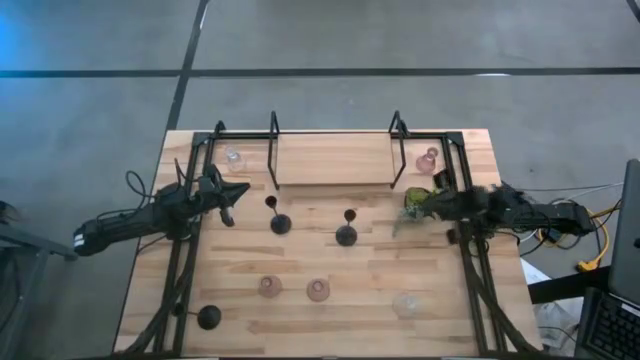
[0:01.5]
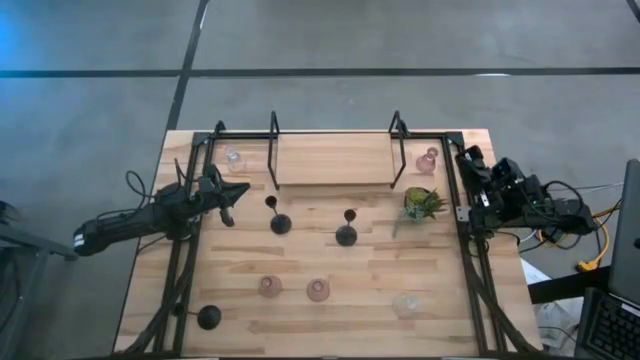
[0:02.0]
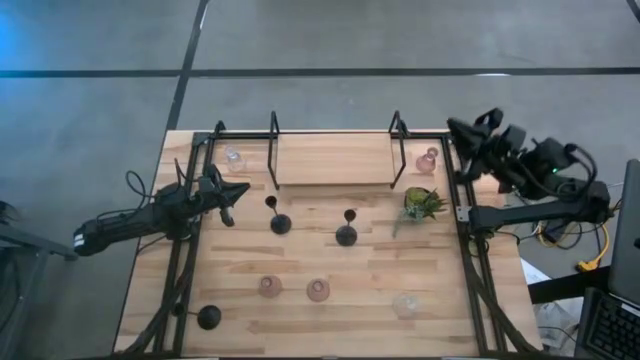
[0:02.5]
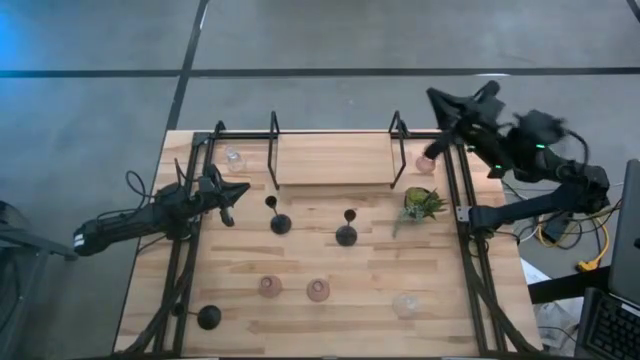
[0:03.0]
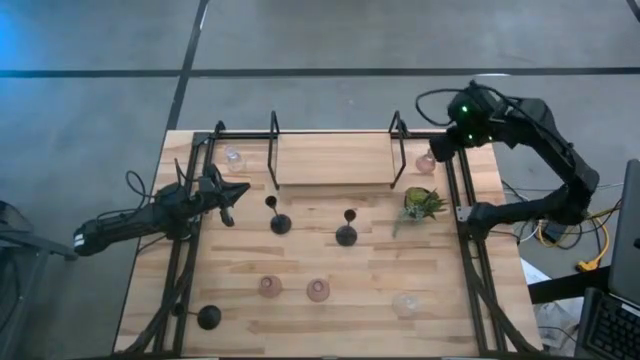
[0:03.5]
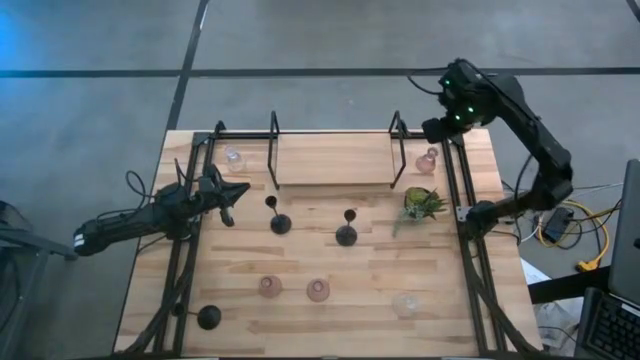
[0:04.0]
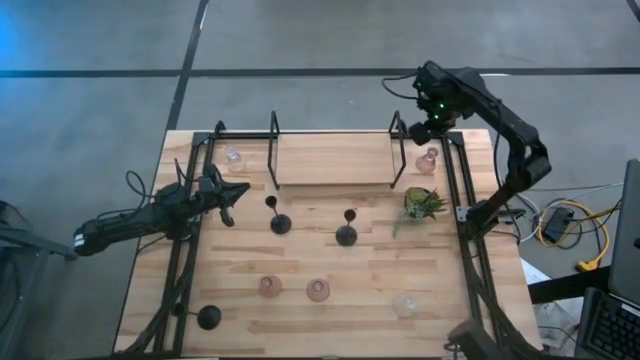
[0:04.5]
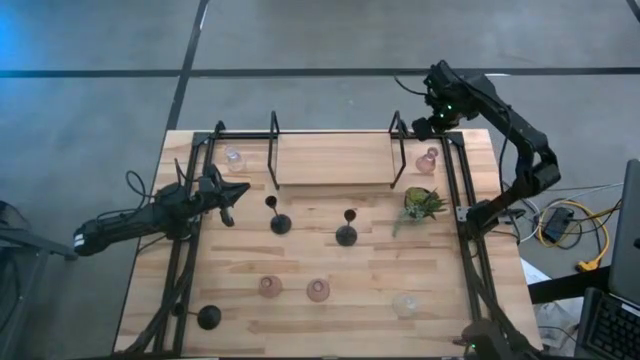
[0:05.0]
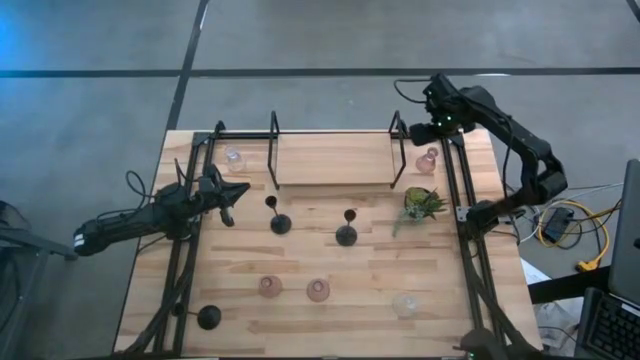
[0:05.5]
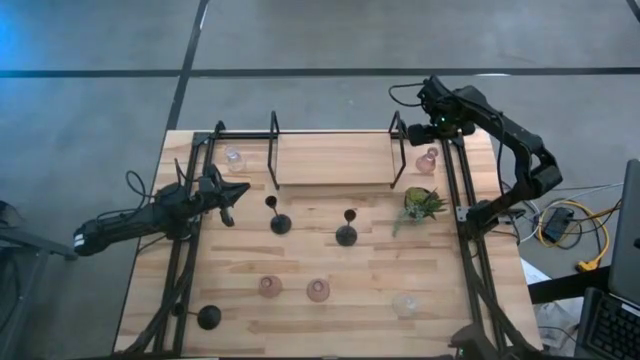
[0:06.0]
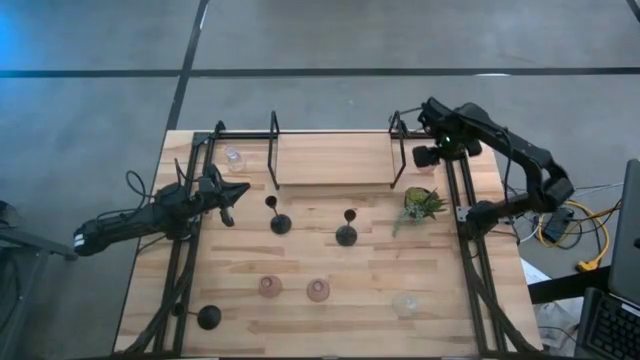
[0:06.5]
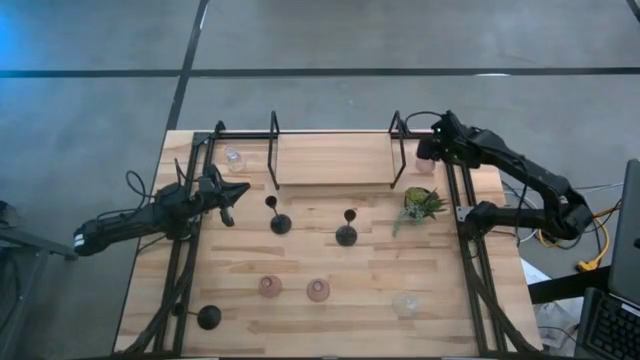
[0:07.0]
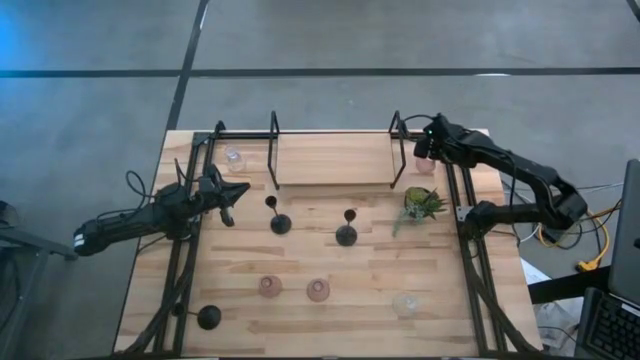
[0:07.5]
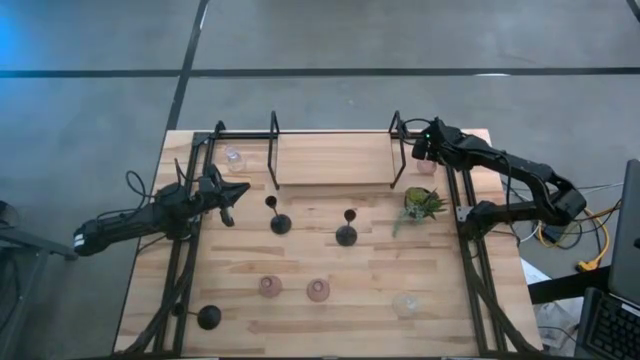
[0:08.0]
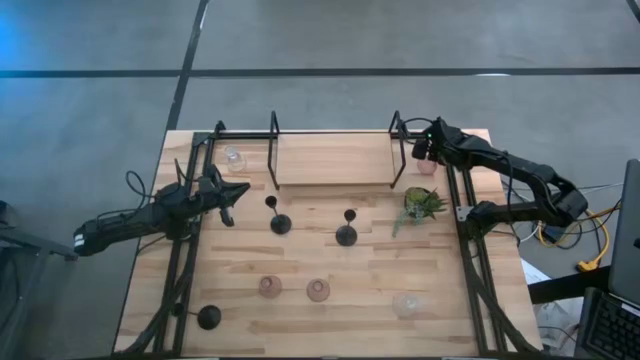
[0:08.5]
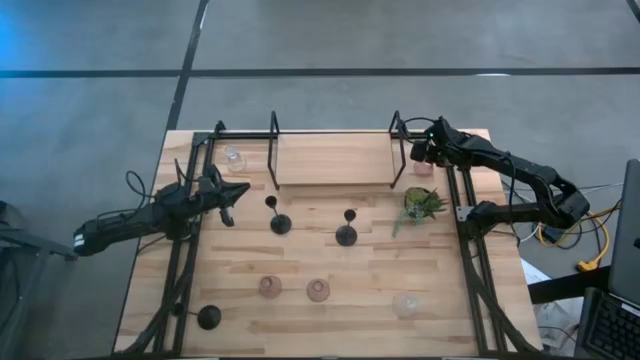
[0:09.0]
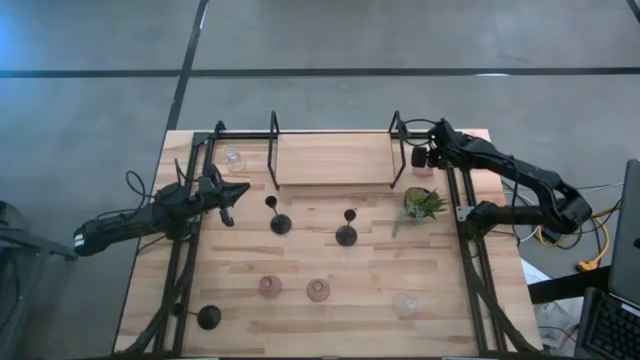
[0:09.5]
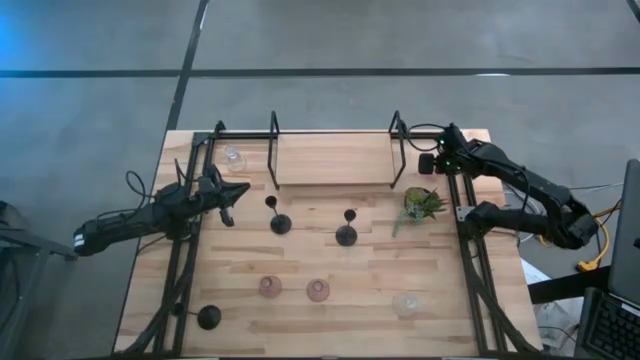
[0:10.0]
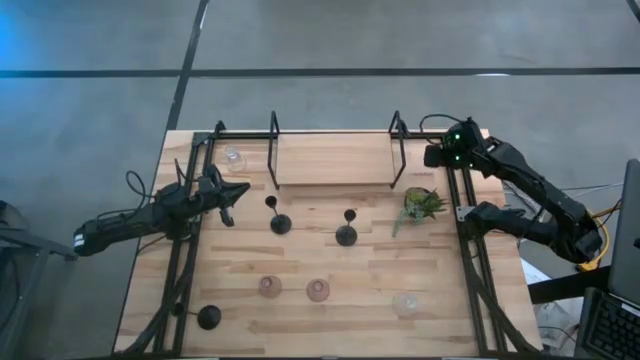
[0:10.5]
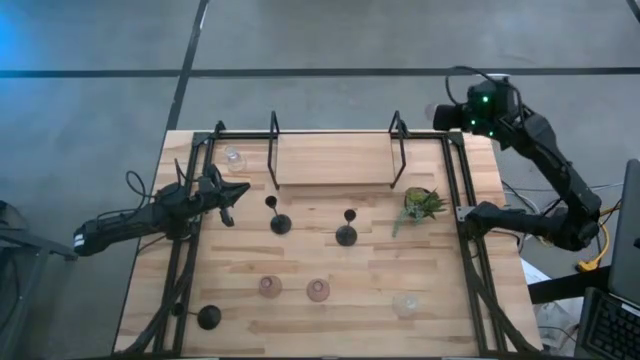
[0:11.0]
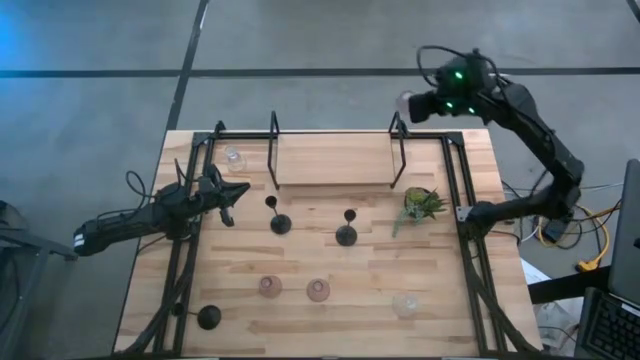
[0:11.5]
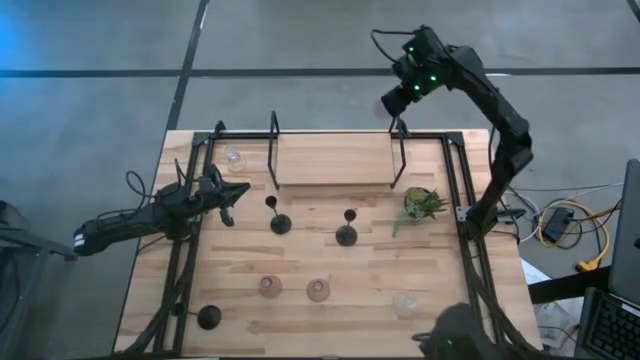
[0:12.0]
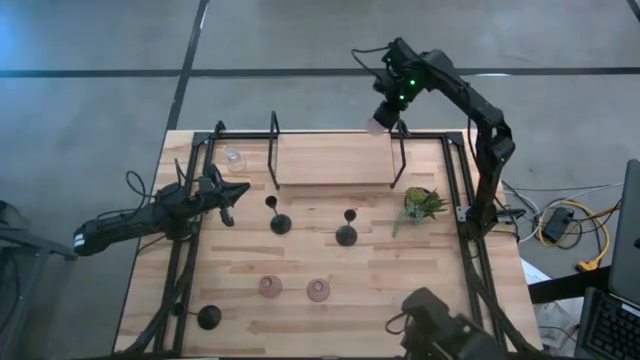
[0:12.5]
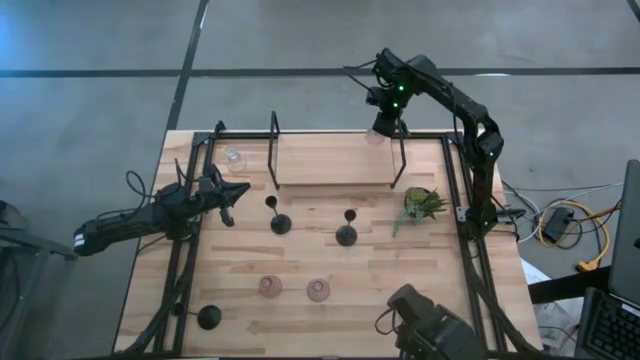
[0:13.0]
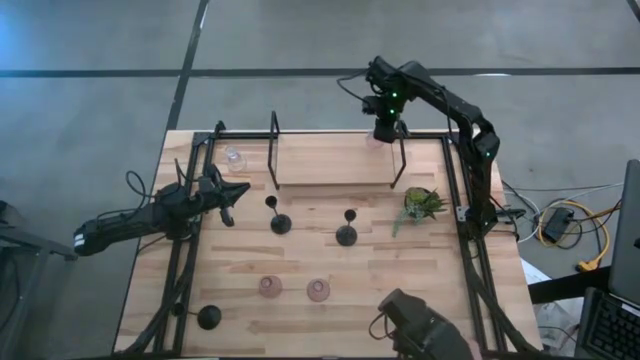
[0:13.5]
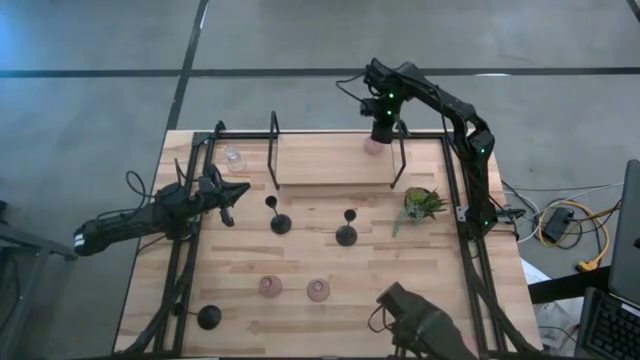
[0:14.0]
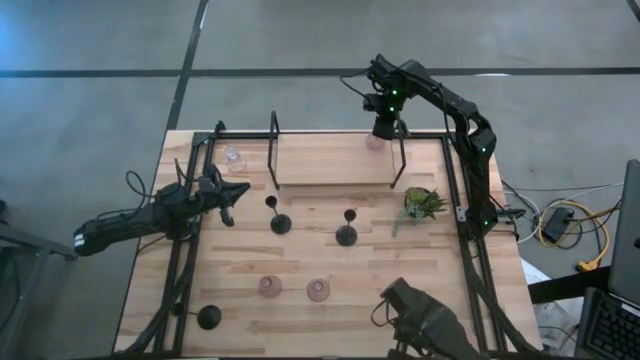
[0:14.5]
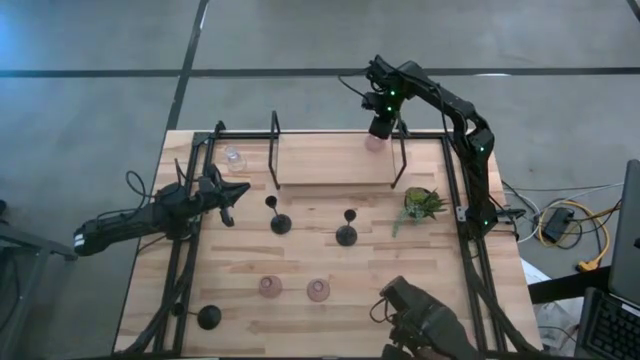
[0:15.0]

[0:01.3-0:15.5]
Task: Pick & Place candle stick holders
Put the top pink glass candle holder on the shelf

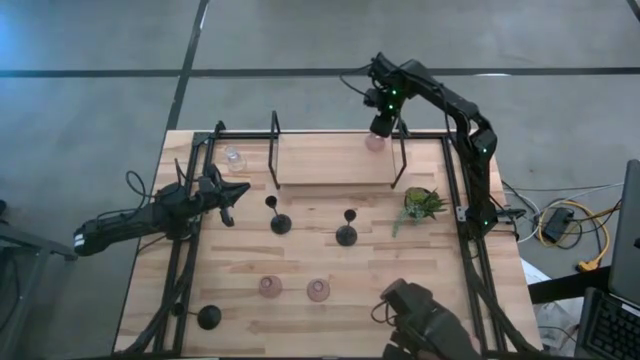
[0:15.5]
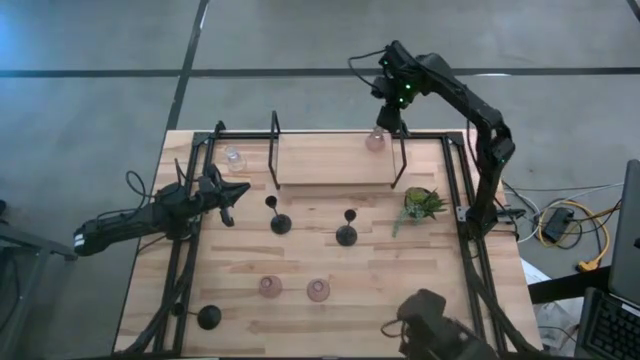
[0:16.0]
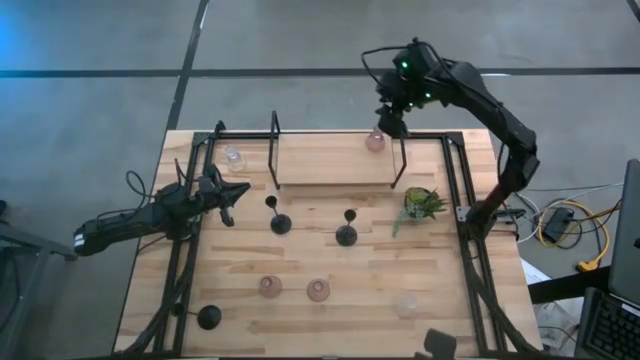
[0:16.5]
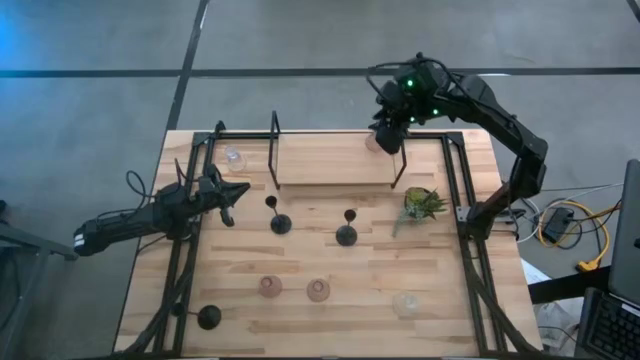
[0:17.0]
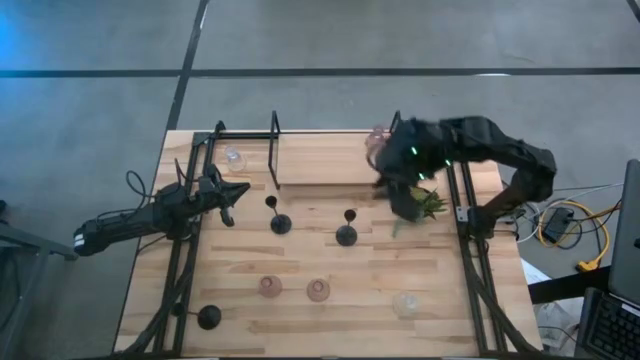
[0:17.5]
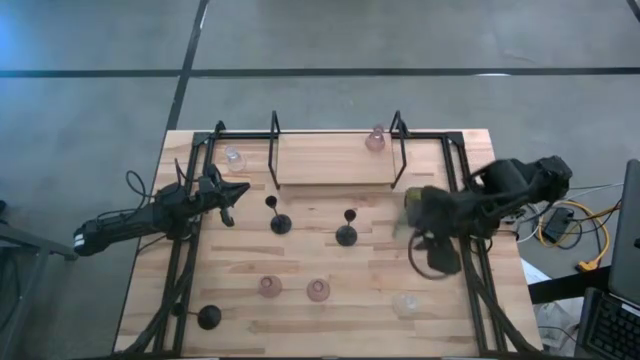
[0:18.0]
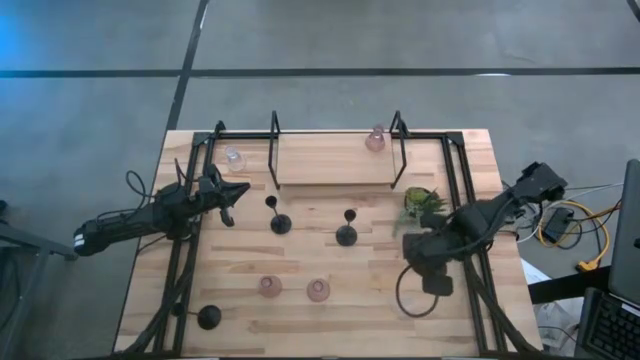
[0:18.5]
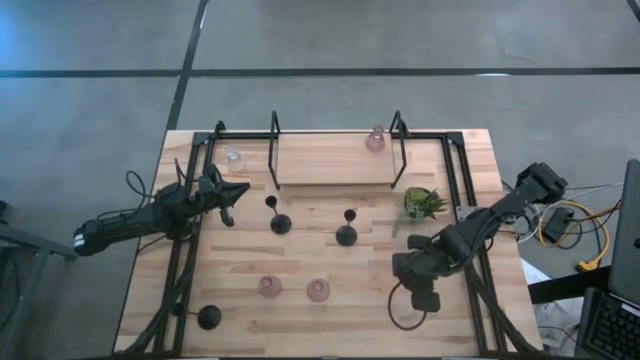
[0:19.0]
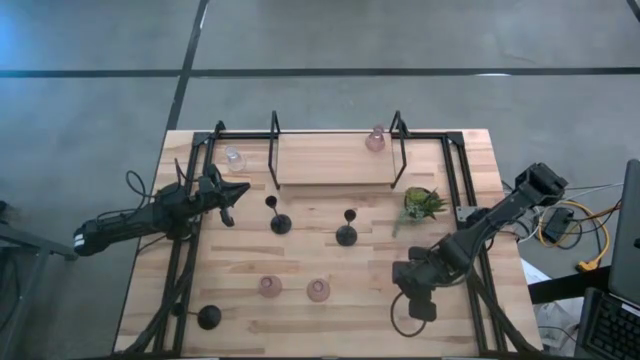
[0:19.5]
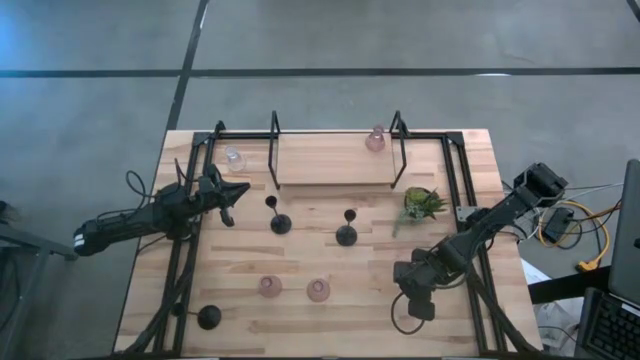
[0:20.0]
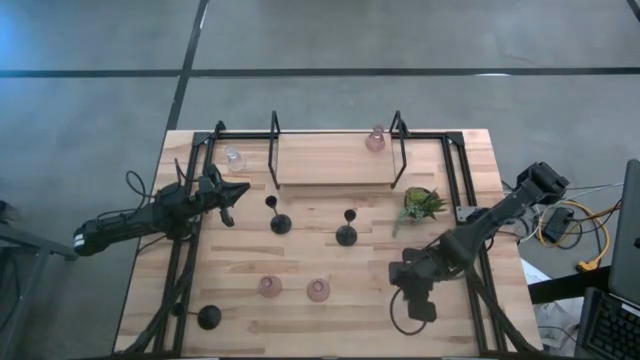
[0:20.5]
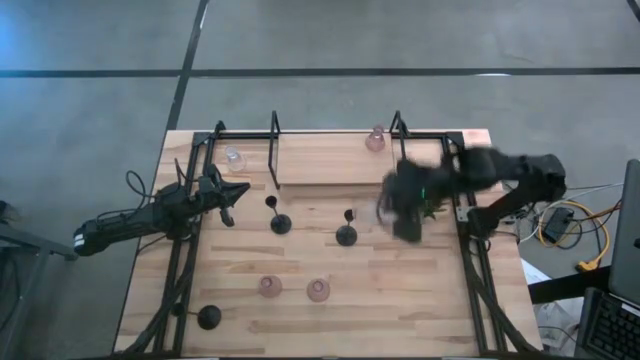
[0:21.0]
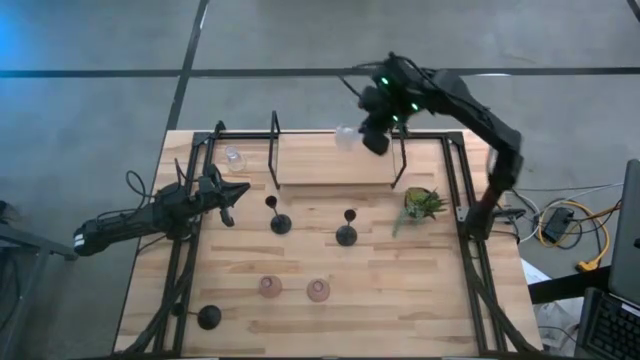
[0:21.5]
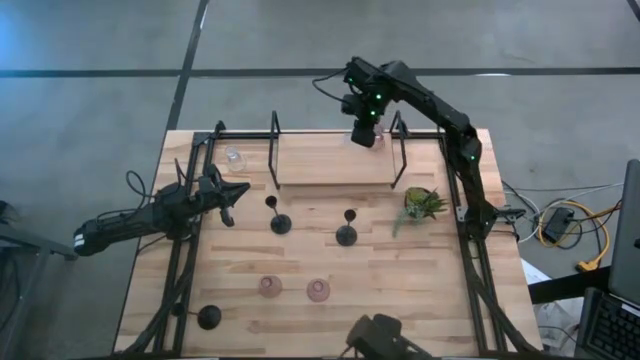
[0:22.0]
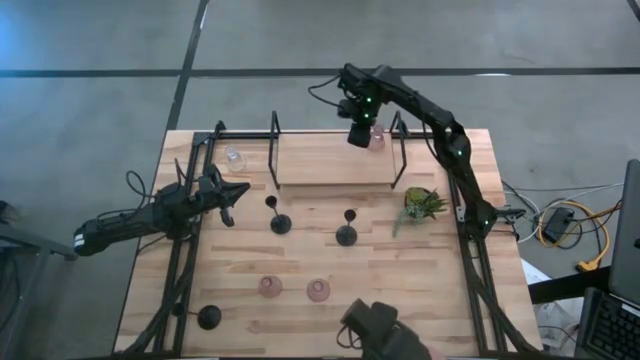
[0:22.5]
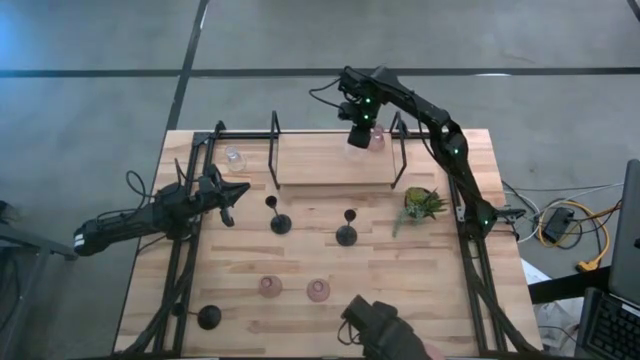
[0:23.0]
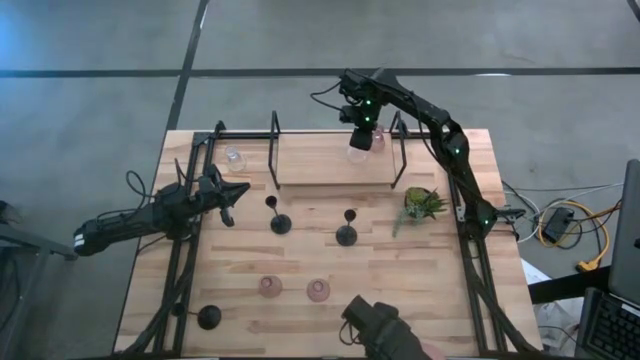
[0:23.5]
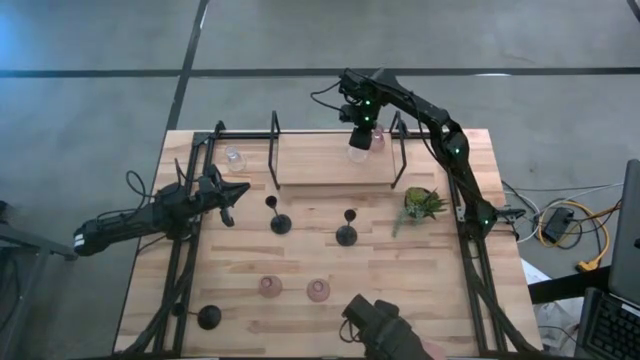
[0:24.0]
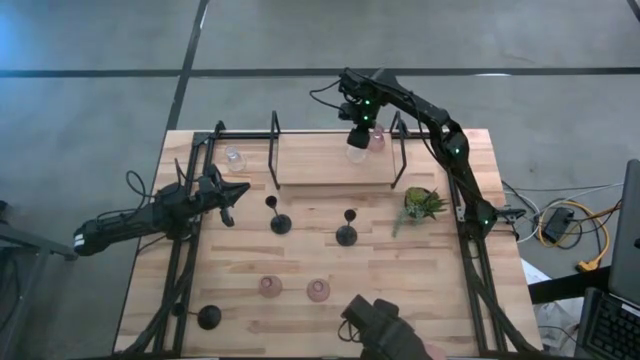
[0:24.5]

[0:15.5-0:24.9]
Put the bottom transparent glass candle holder on the shelf
